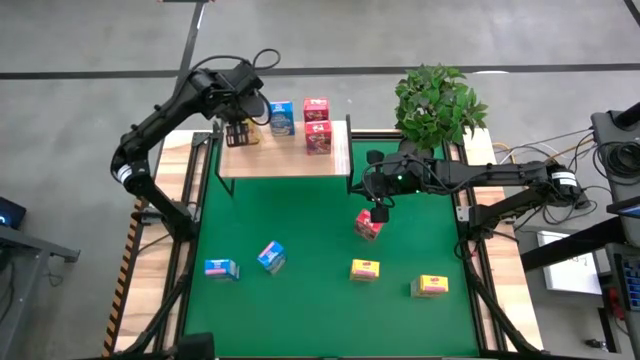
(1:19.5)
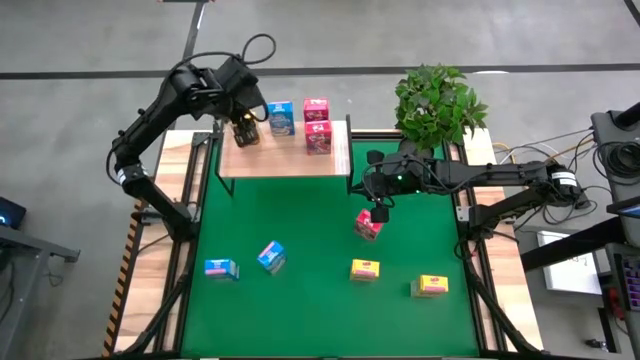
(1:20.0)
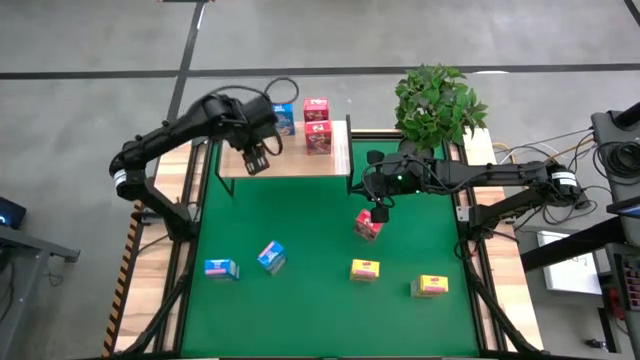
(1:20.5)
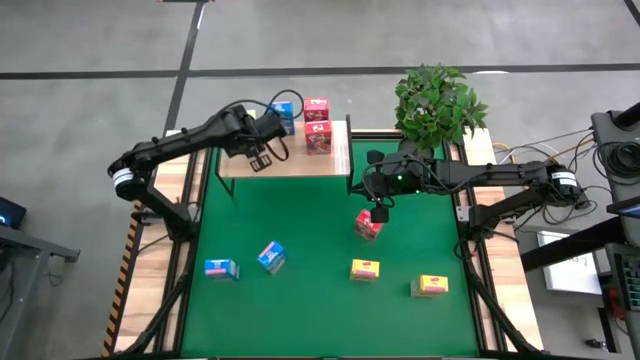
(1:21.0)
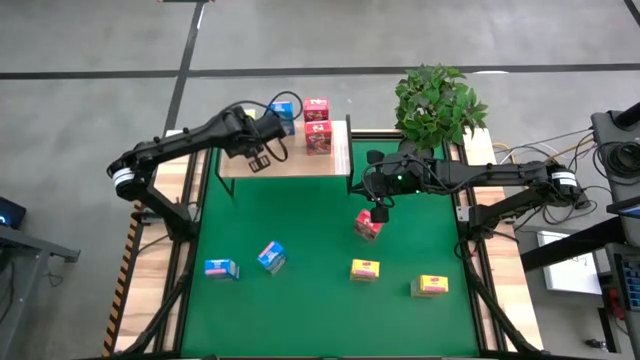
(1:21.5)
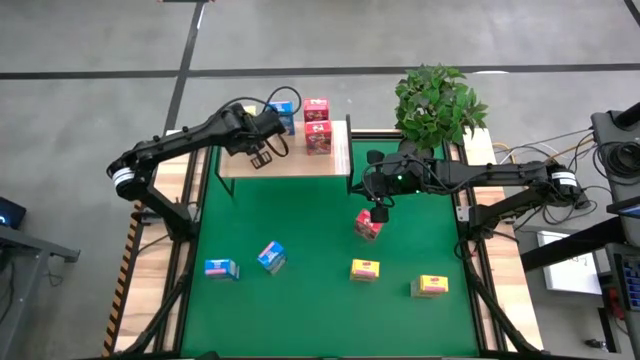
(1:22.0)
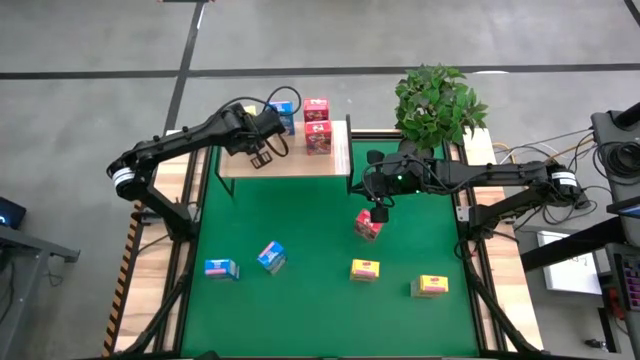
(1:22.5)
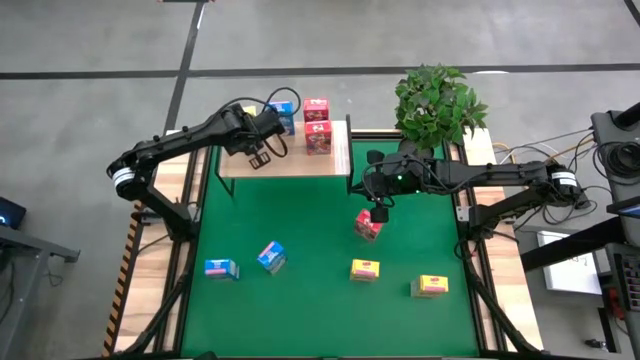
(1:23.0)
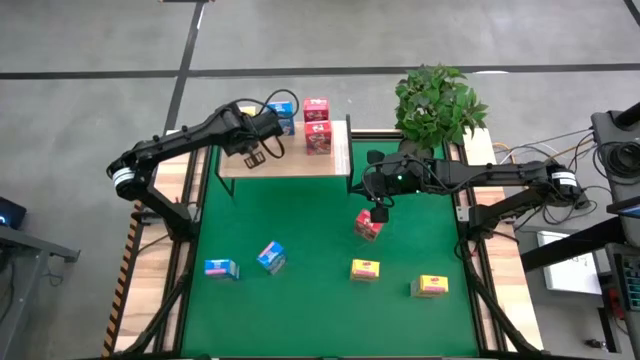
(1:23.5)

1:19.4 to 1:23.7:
Task: Stack cereal on shelf
Adjust the yellow cereal on the shelf

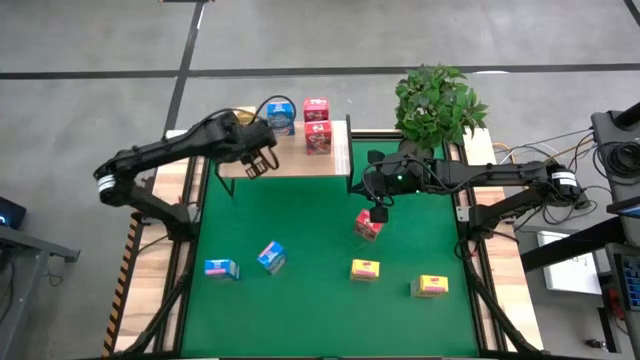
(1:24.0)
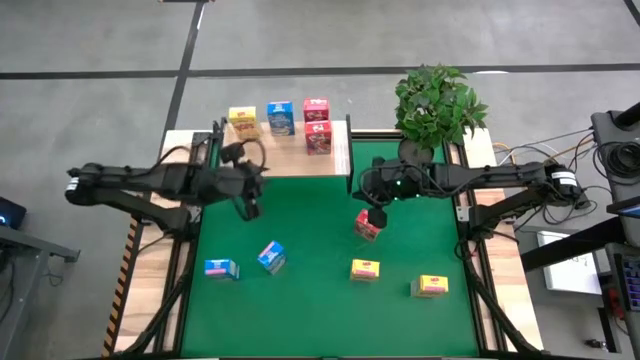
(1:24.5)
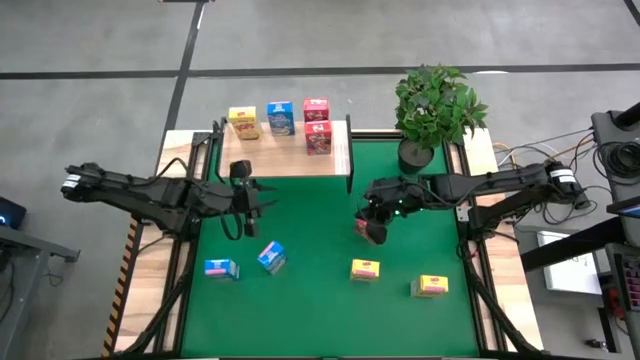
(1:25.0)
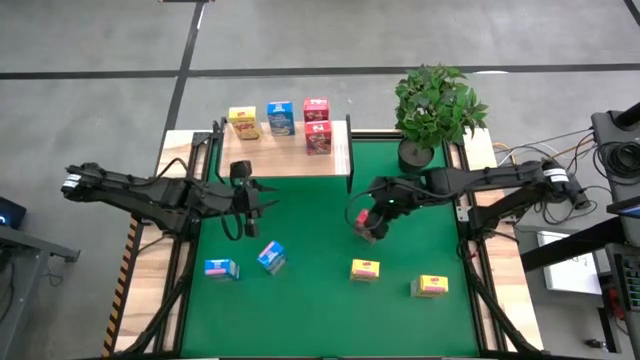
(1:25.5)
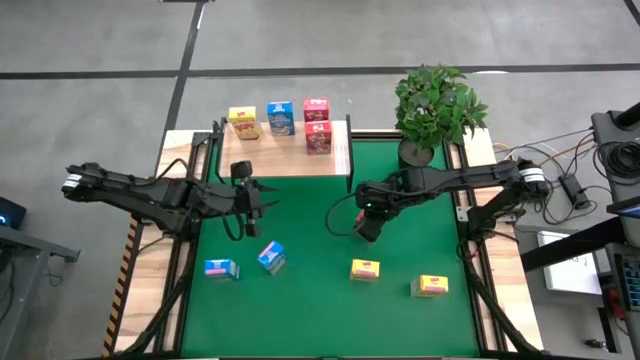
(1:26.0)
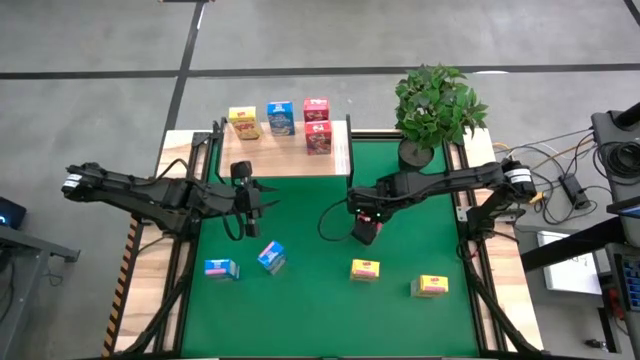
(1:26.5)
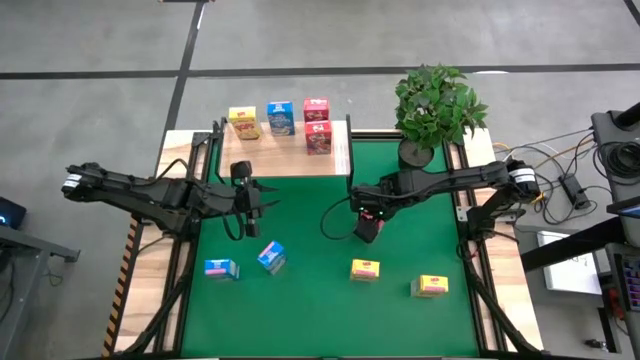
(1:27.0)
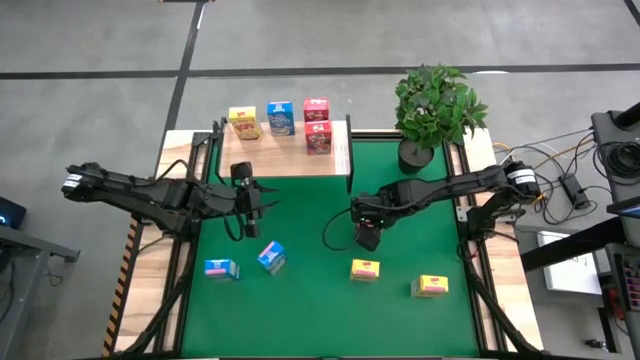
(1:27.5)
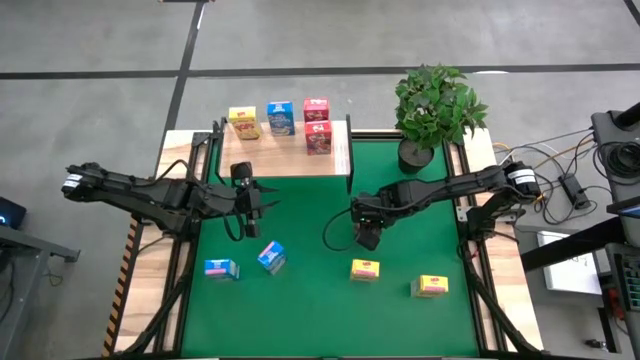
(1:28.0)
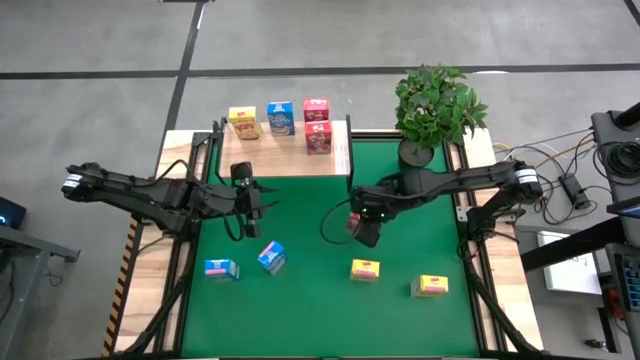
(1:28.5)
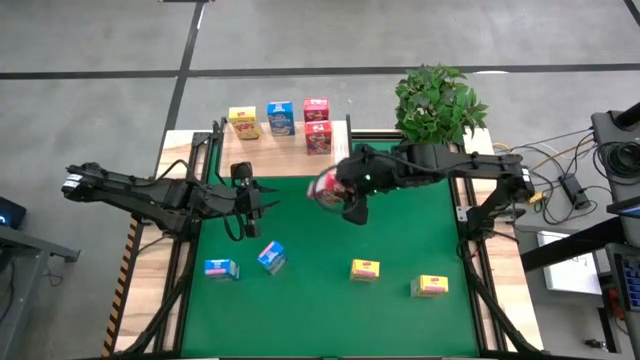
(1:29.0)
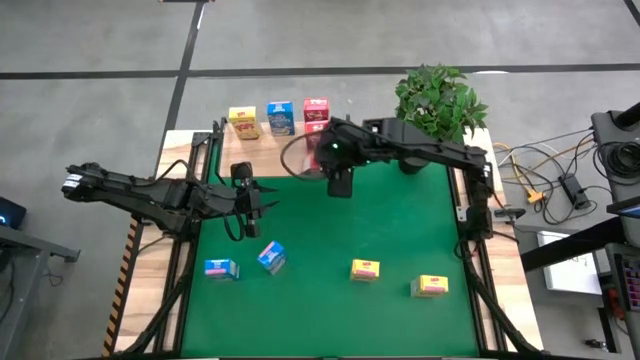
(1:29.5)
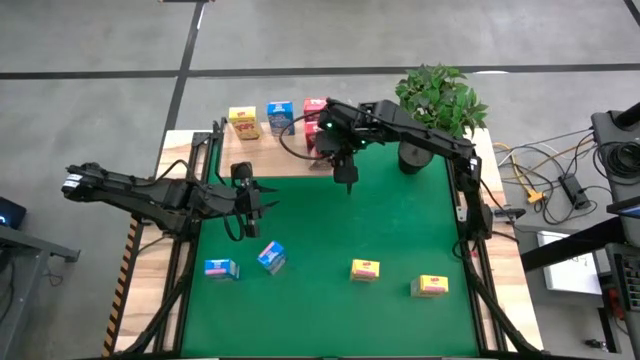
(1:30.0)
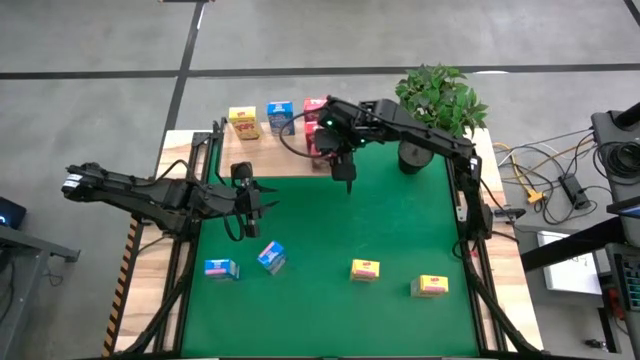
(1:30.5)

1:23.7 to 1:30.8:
Put the red cereal on the shelf

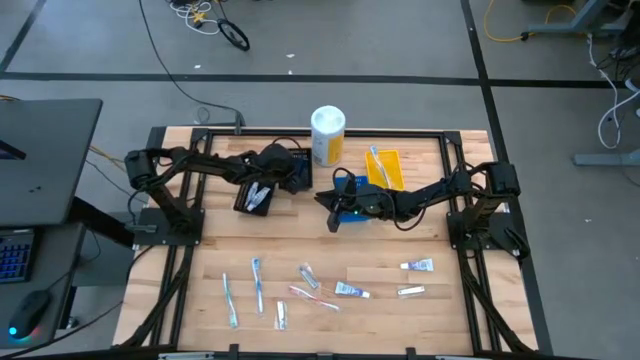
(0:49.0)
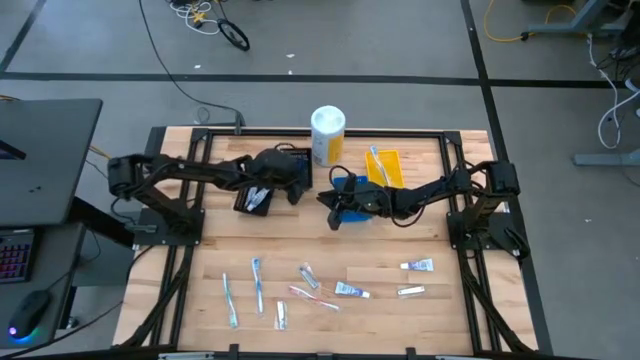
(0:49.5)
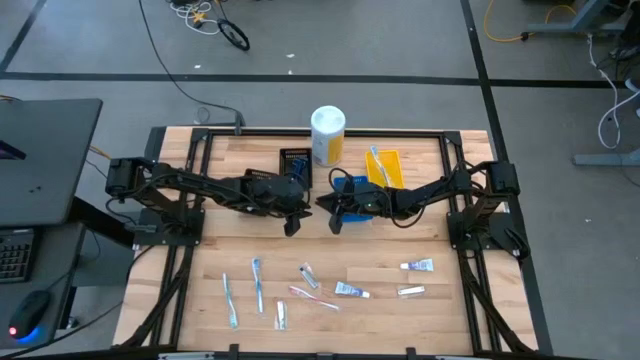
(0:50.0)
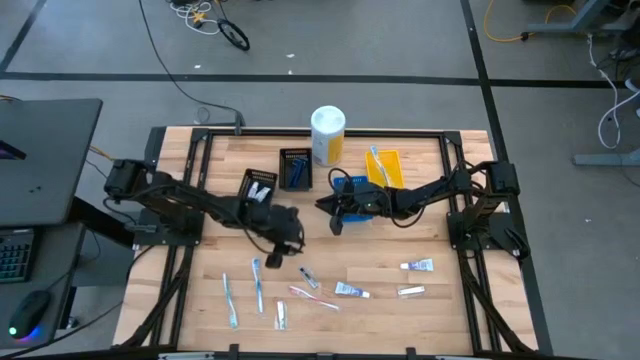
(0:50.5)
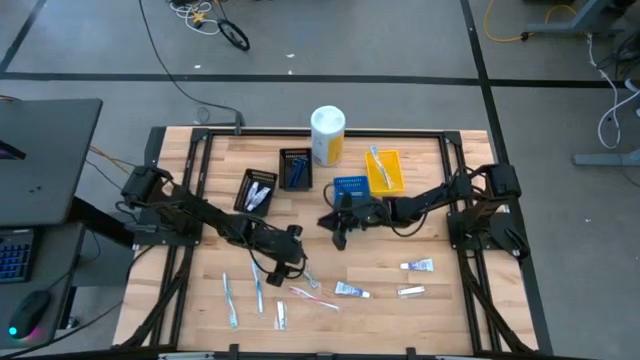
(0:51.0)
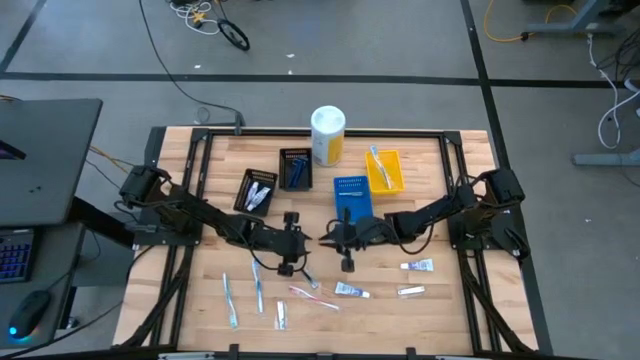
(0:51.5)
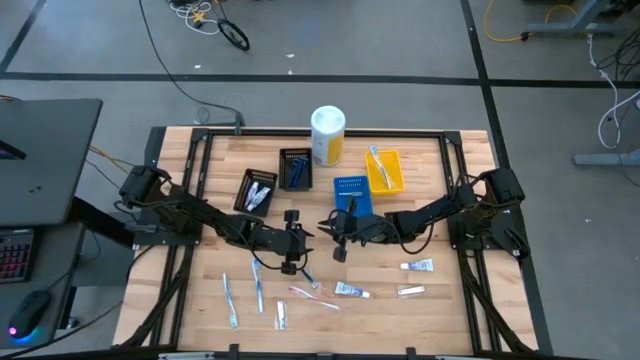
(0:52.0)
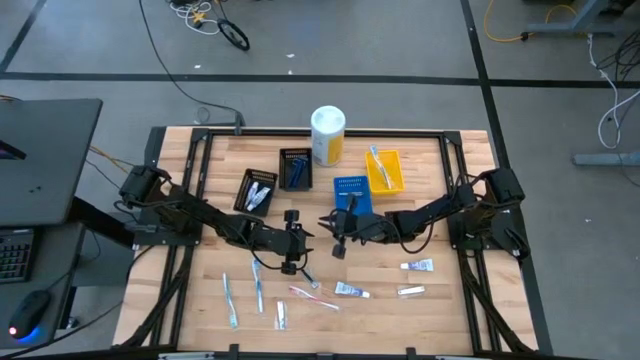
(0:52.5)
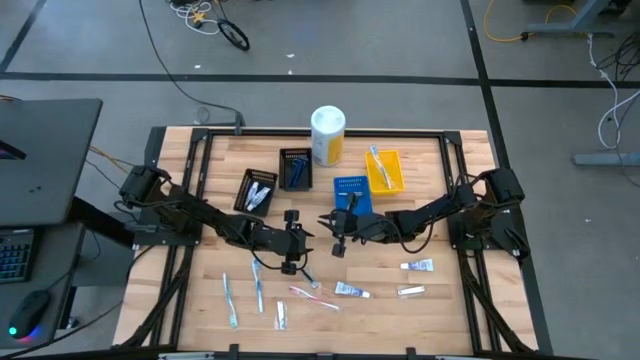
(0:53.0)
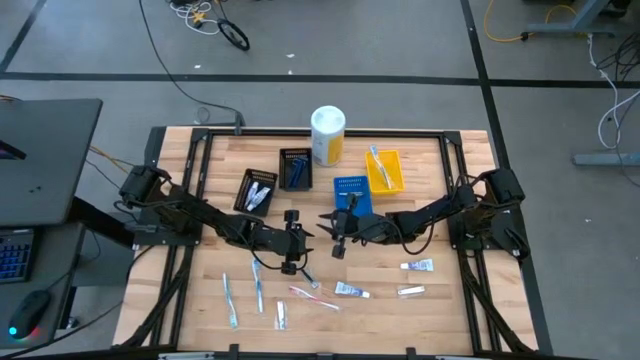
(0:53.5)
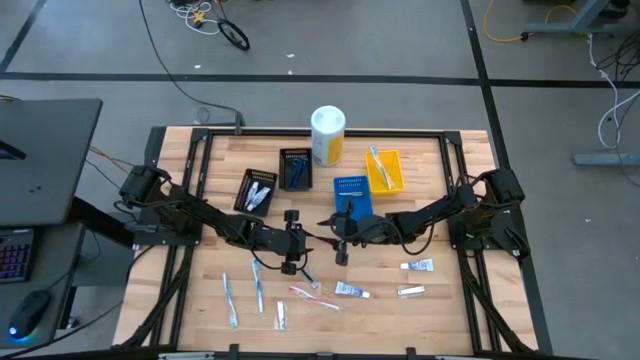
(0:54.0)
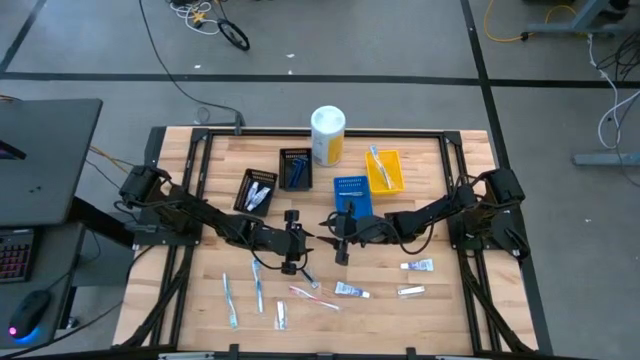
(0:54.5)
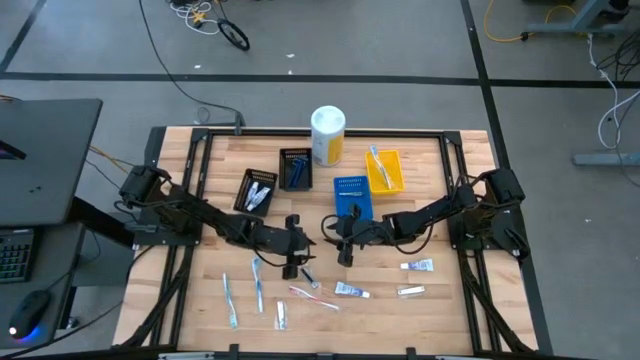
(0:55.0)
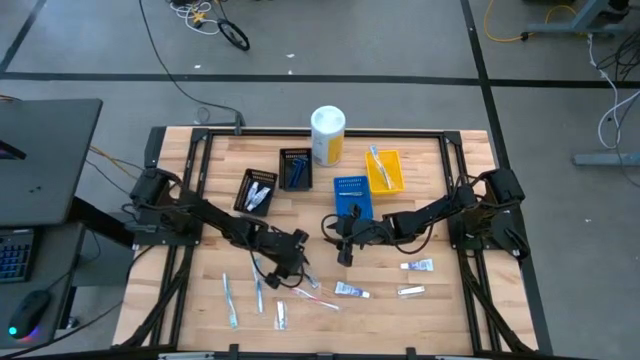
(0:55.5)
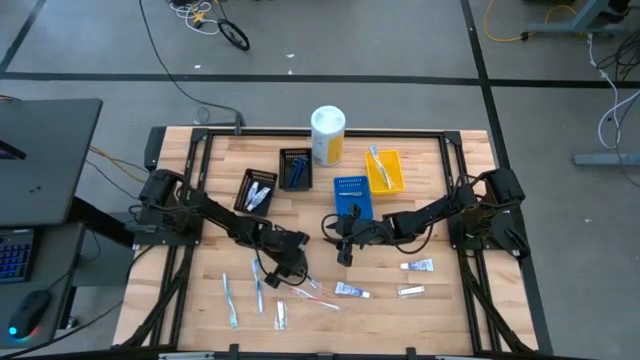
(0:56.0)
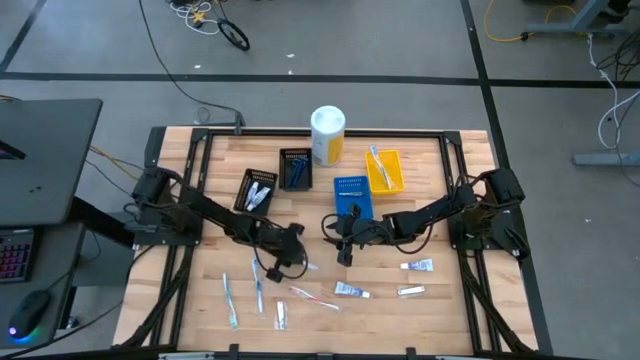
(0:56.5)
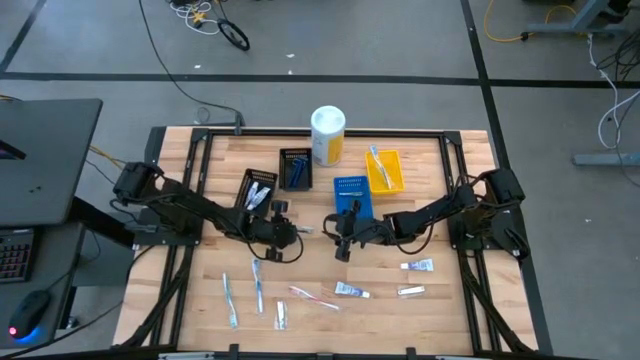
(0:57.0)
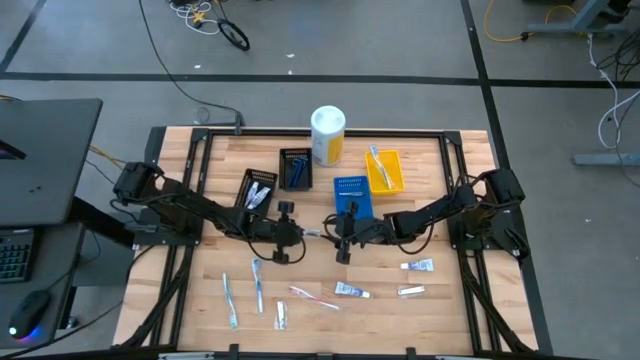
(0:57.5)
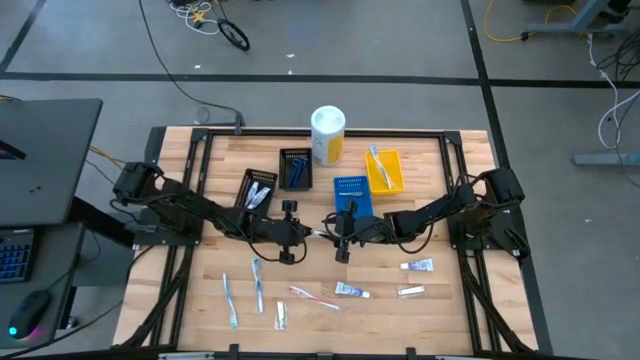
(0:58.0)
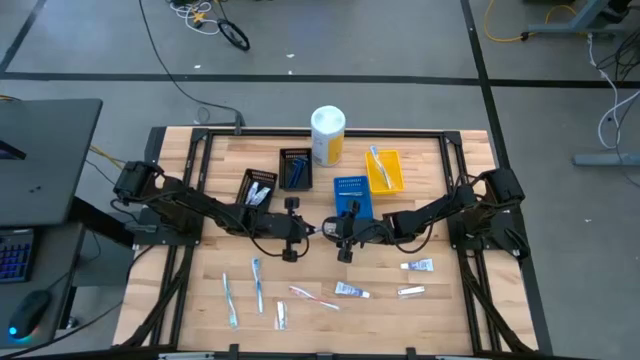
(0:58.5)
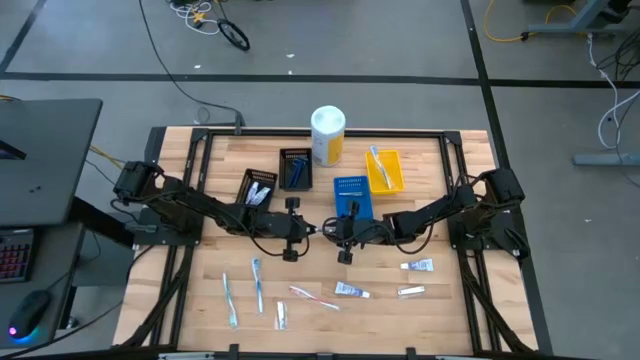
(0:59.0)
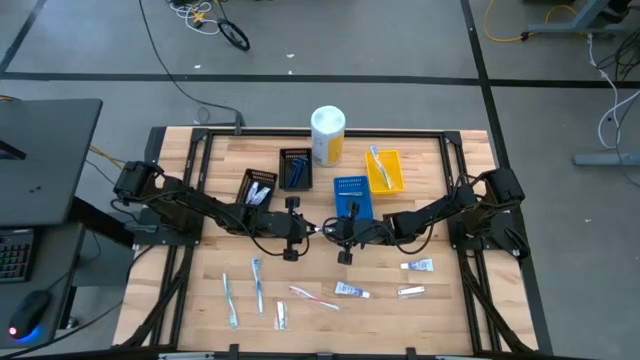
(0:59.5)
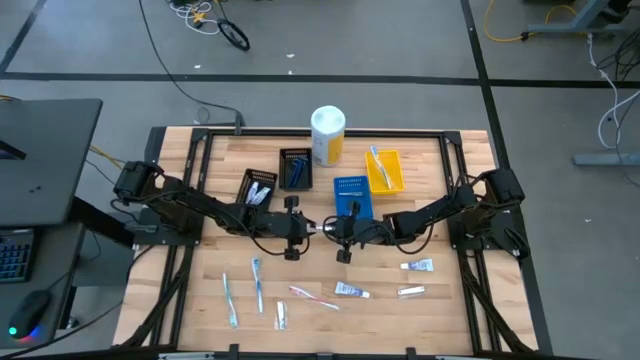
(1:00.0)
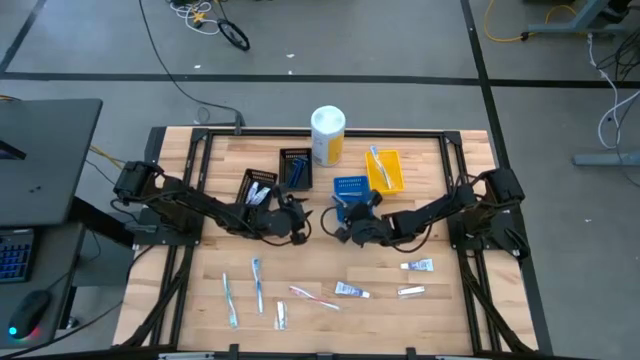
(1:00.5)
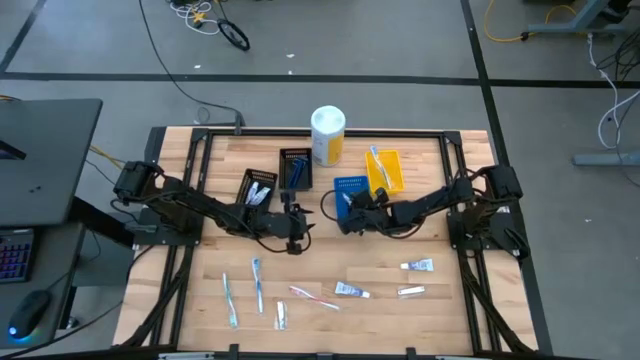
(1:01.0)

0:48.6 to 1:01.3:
Task: Pick & Place Travel size toiletries
Put the silver nail cutter into the blue bin
